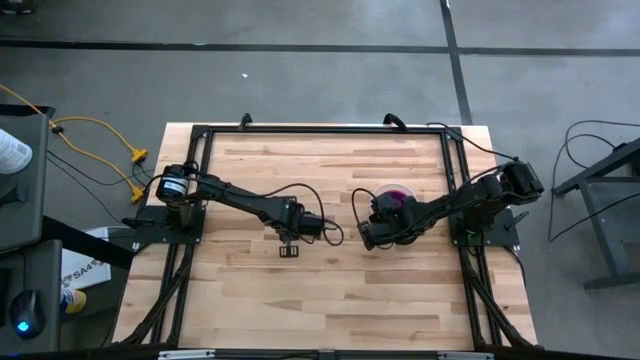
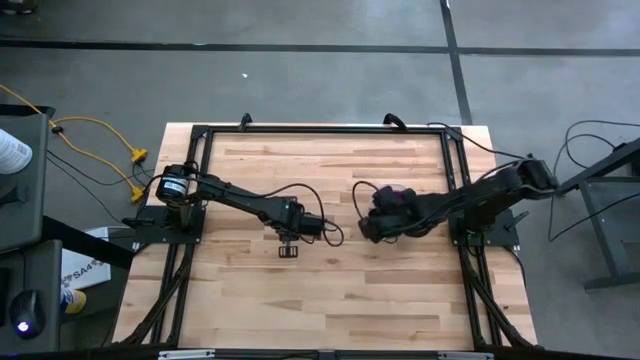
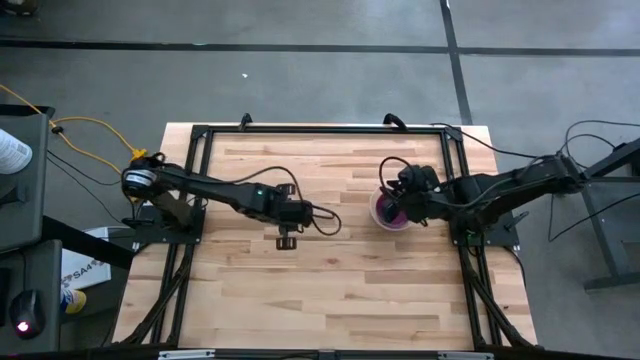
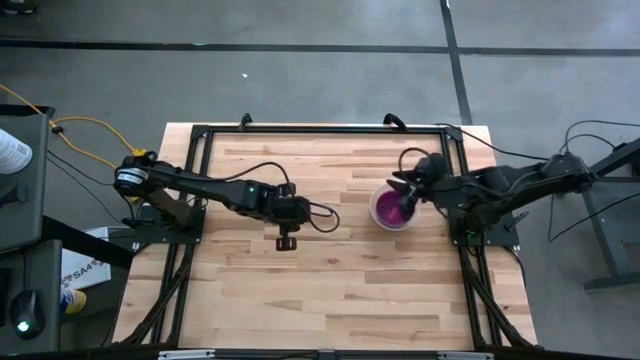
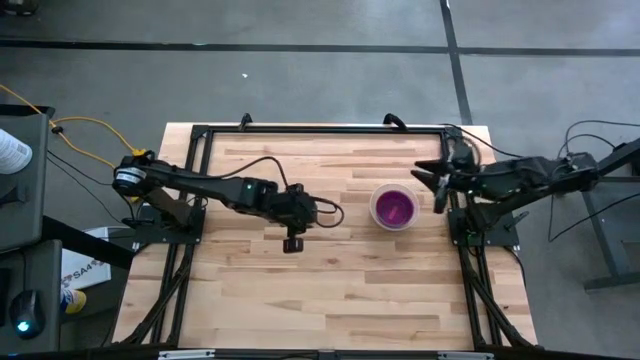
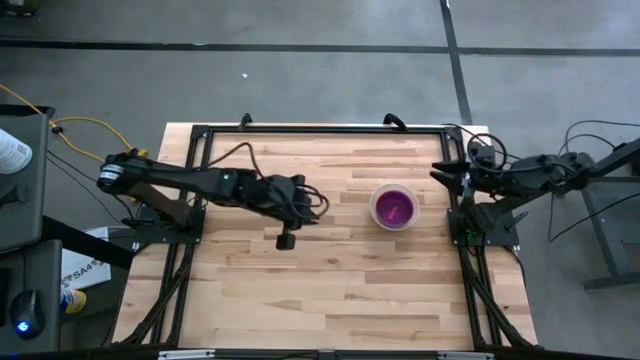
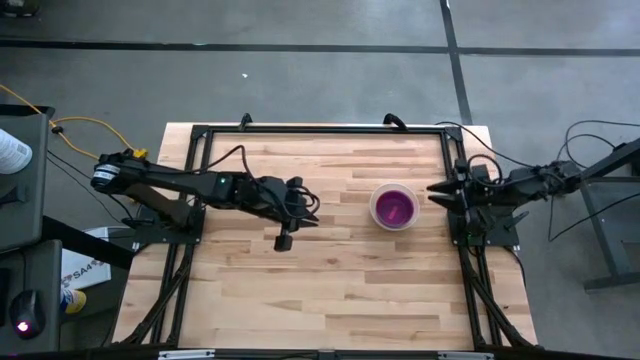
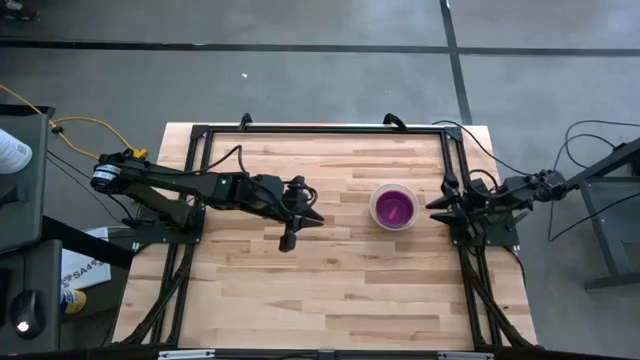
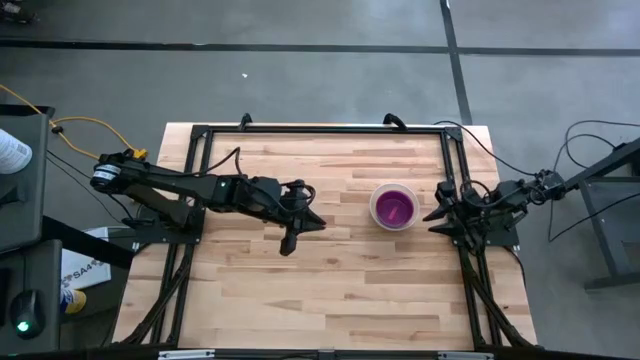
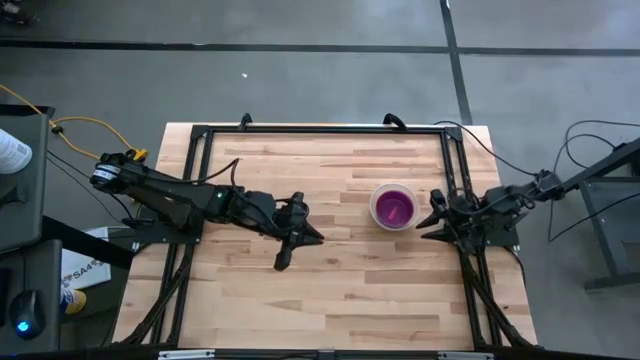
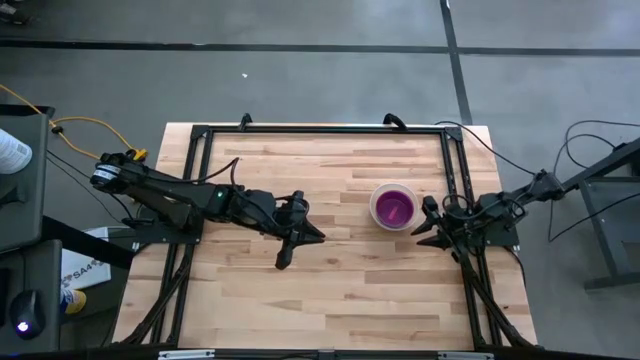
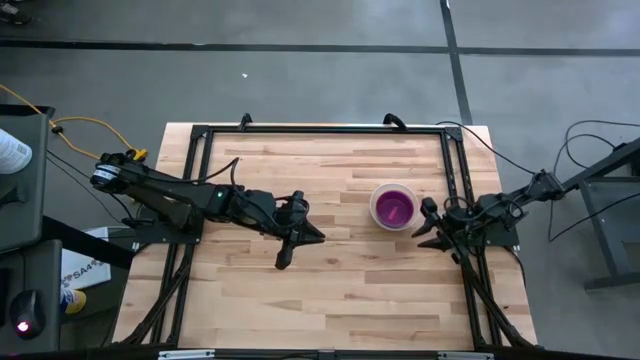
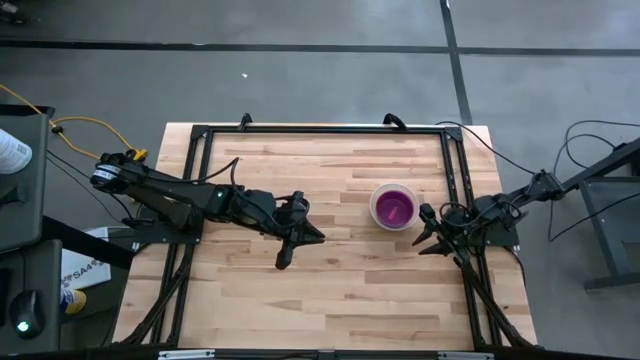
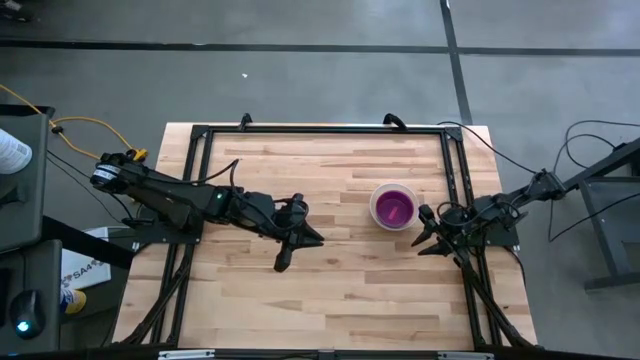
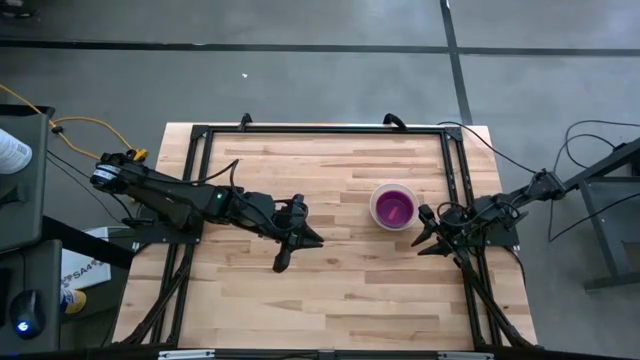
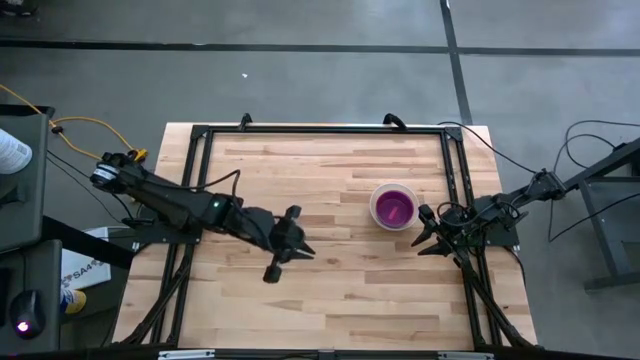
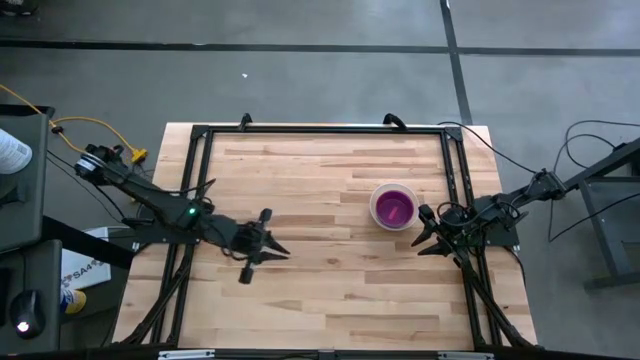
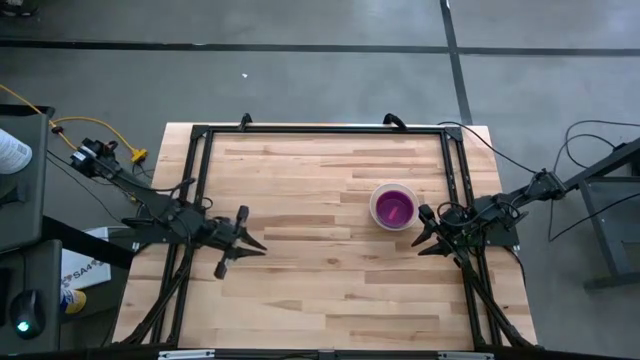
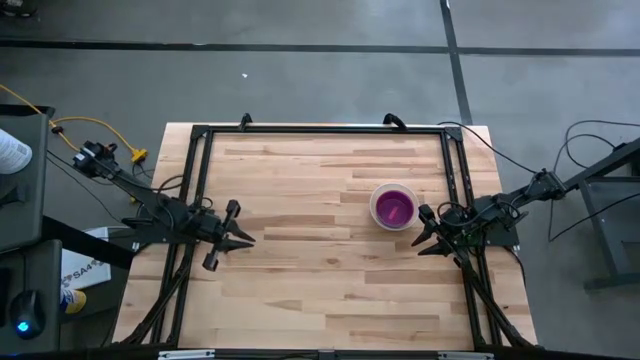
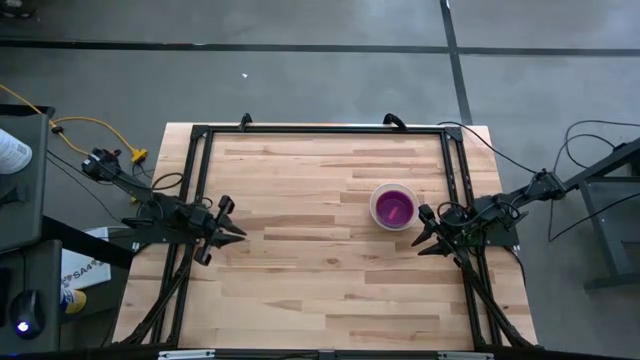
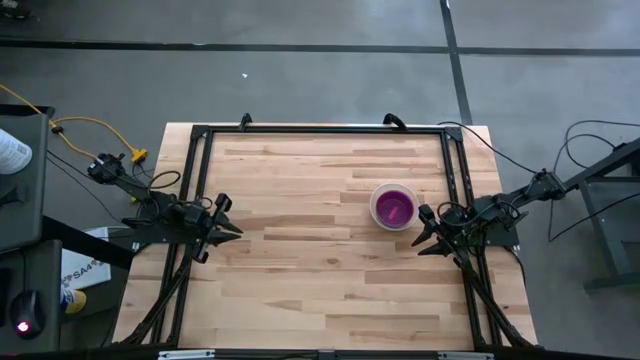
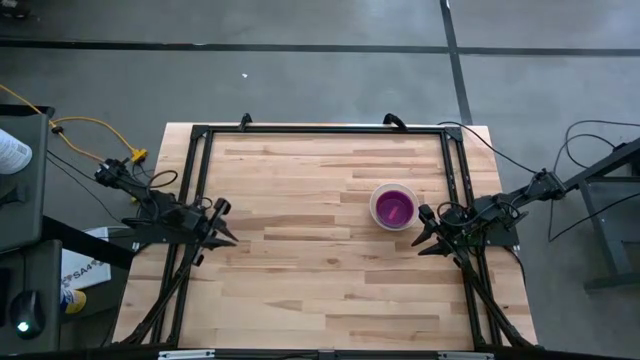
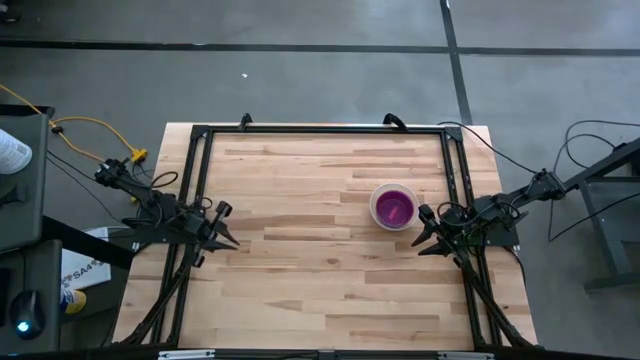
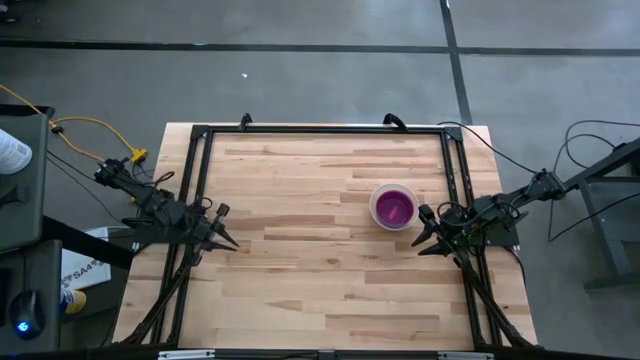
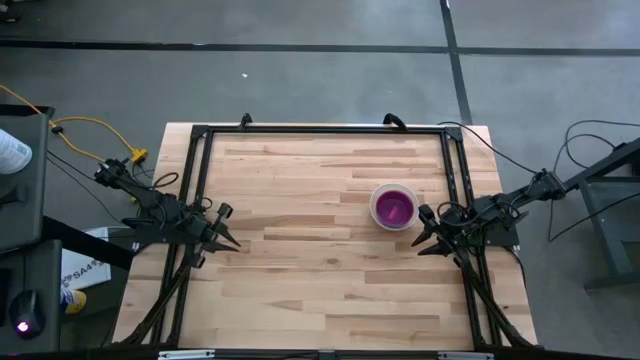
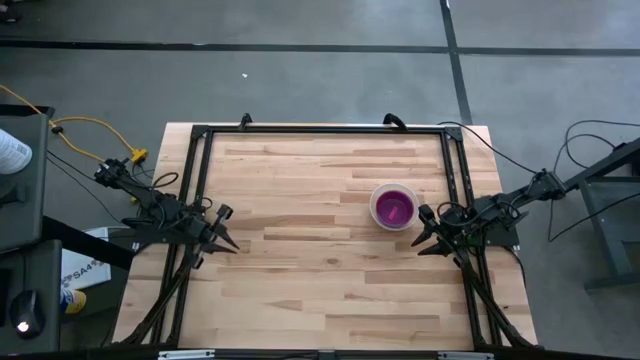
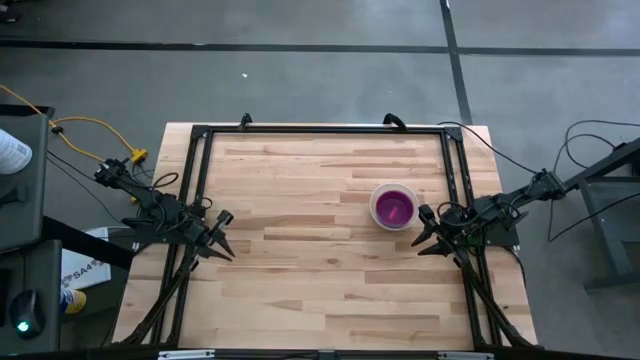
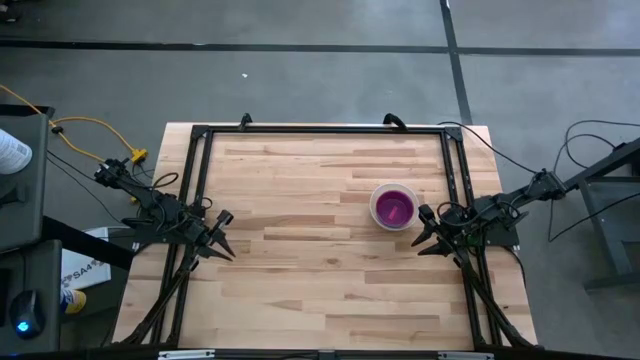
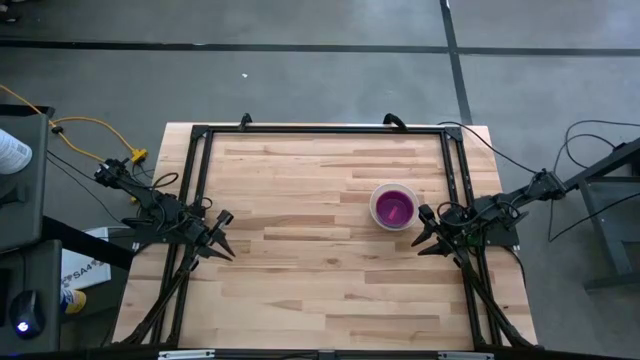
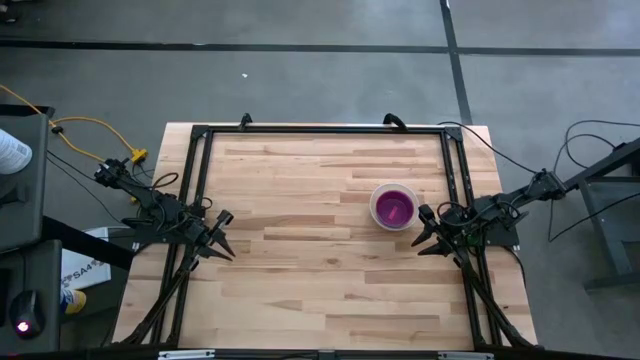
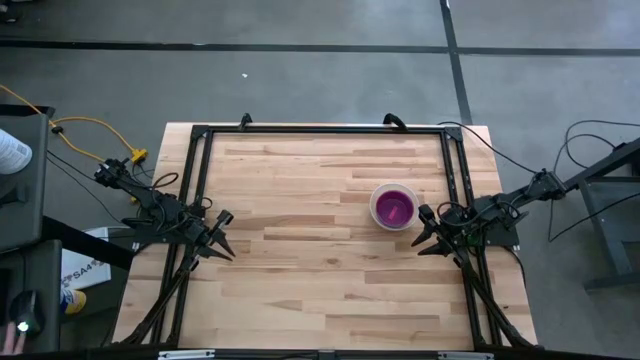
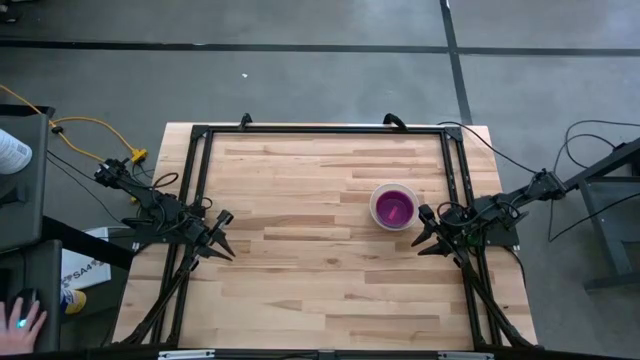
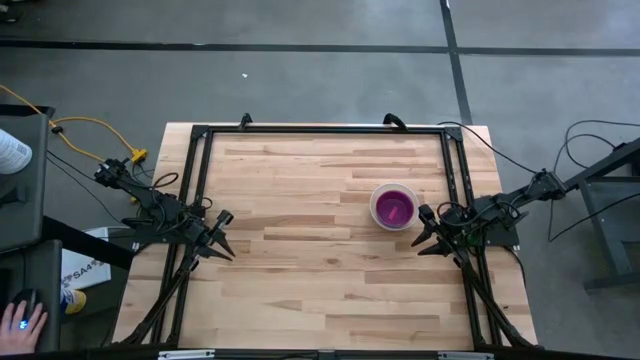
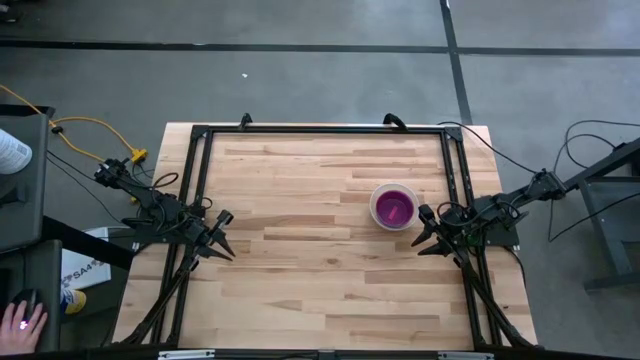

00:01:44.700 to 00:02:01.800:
Return to Home Position

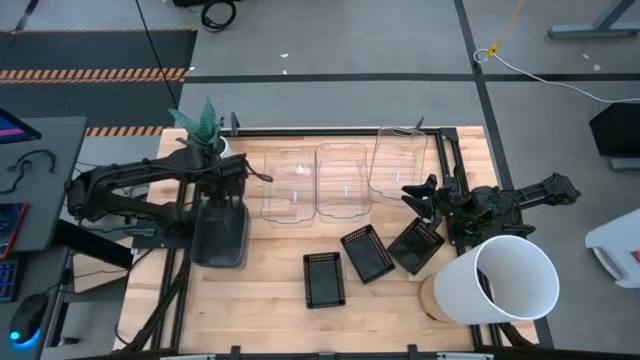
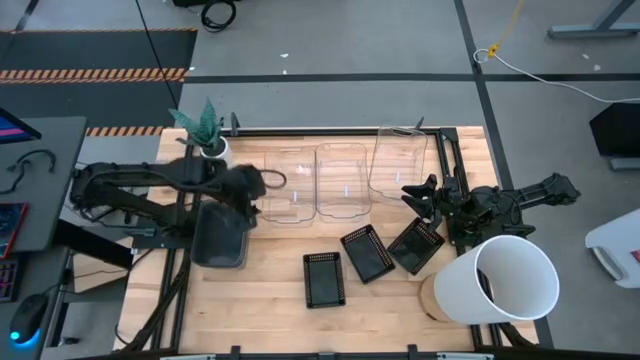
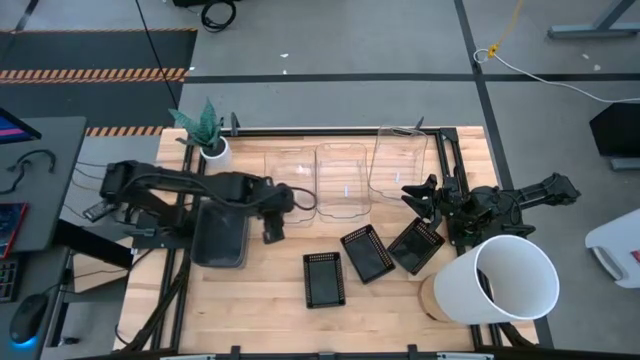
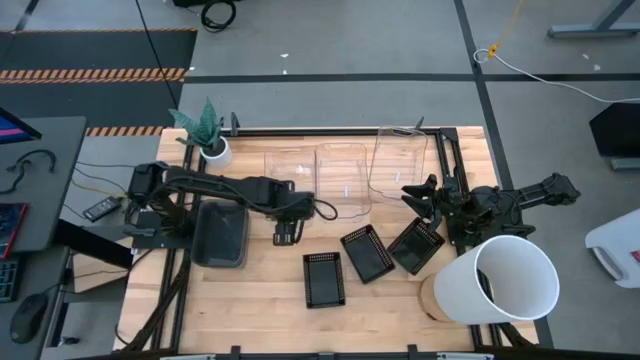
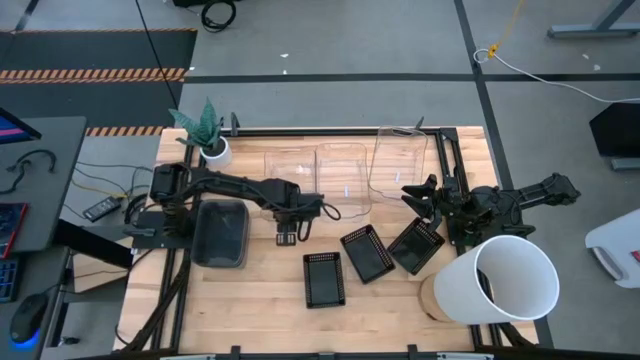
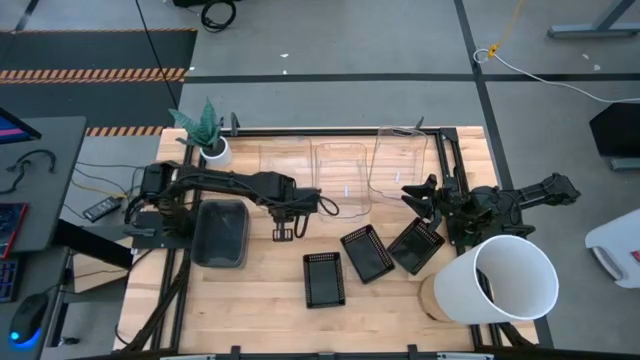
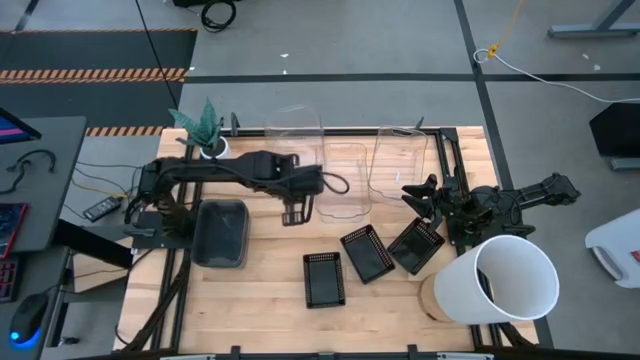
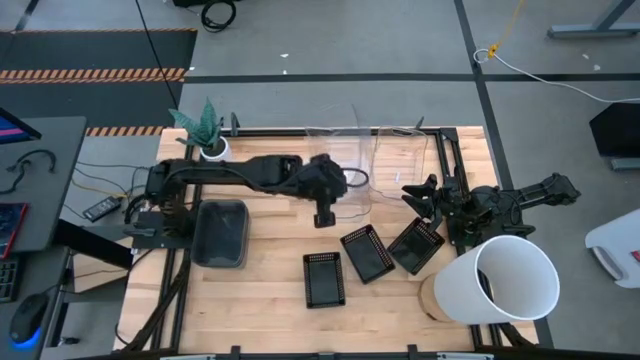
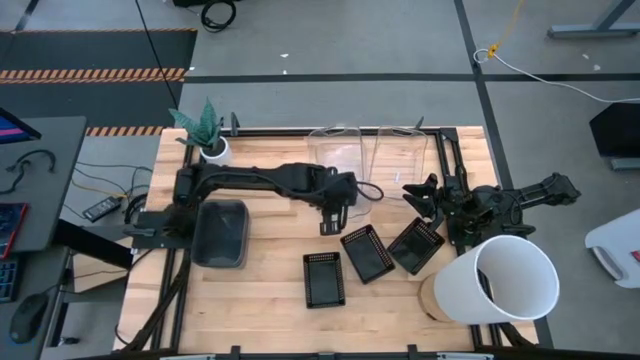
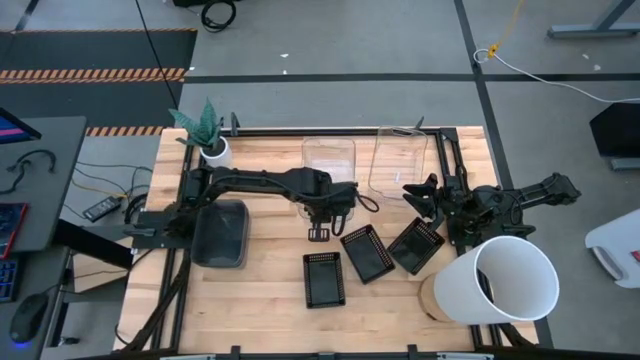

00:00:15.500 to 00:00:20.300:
Stack the left transparent bin on the center transparent bin
